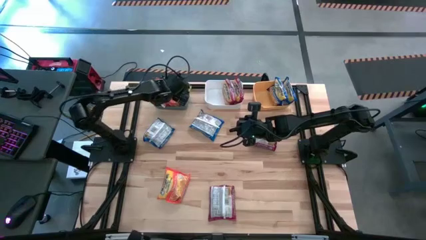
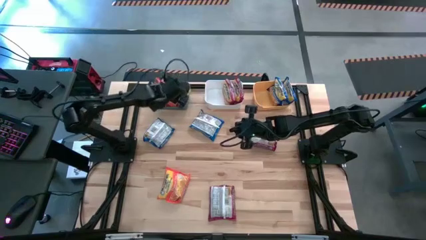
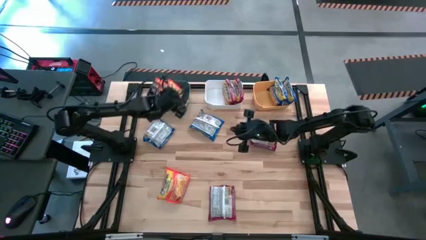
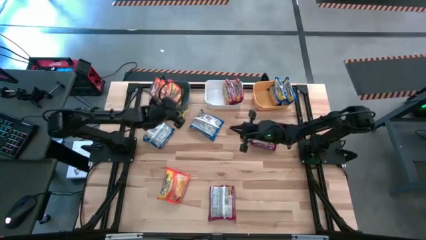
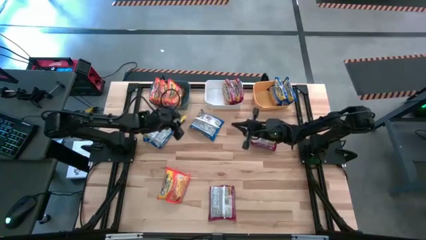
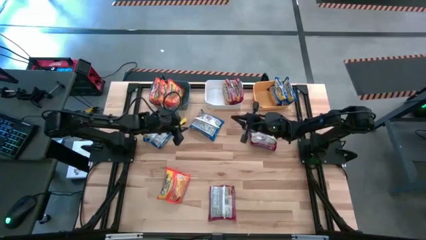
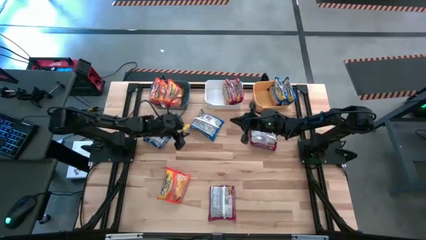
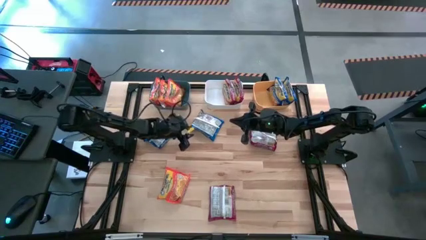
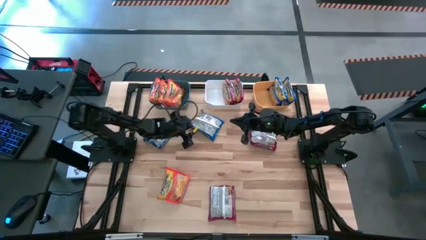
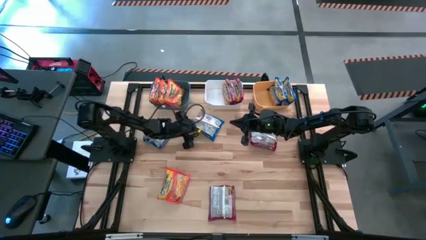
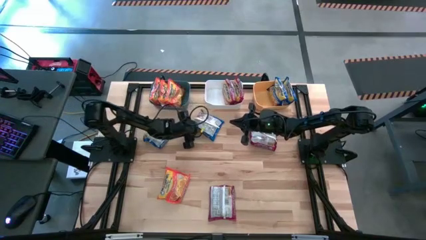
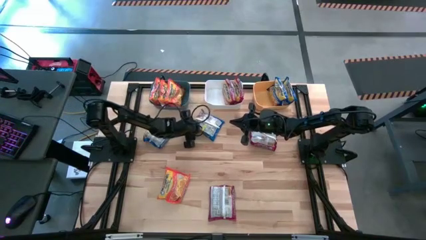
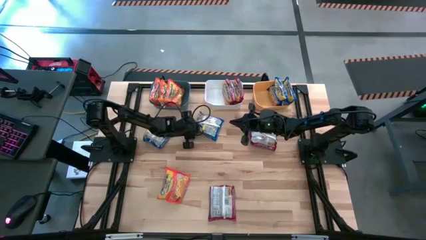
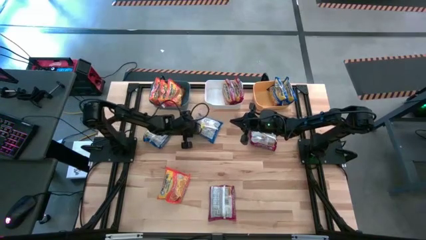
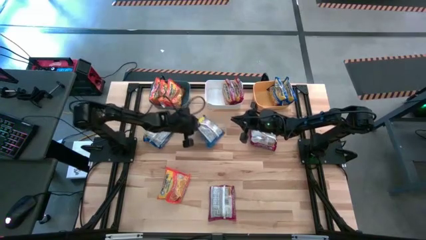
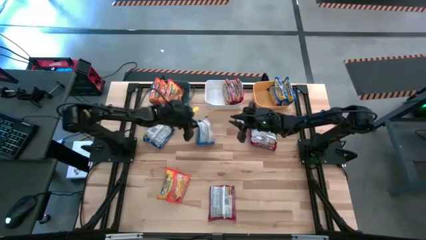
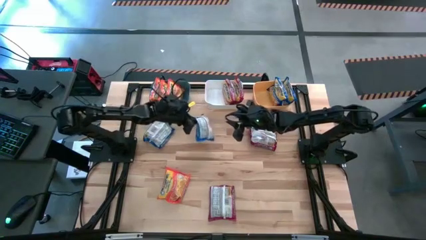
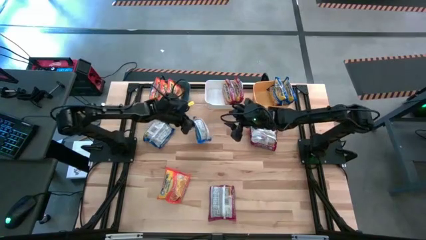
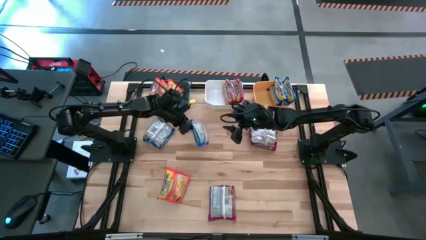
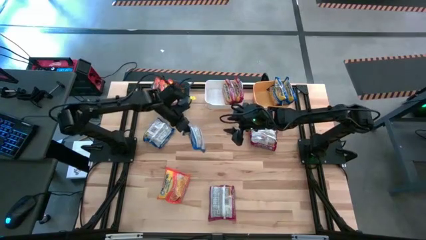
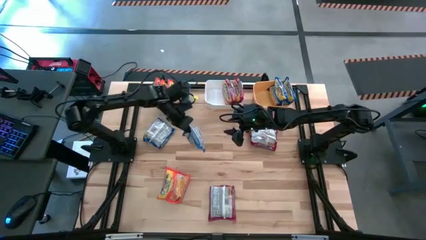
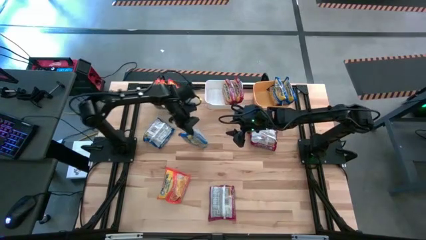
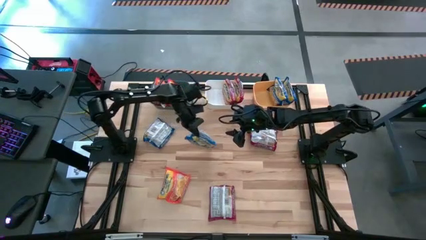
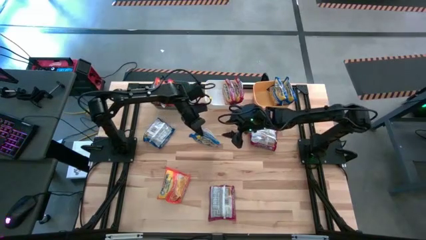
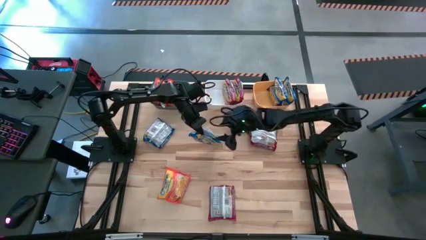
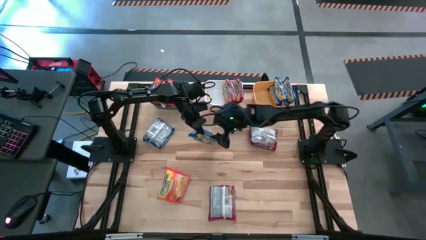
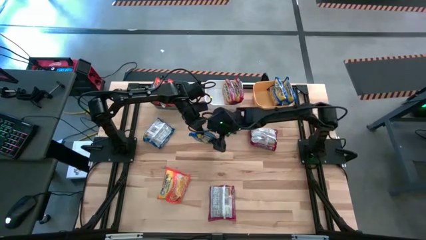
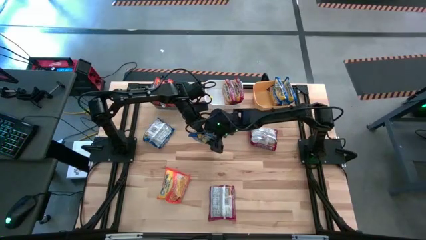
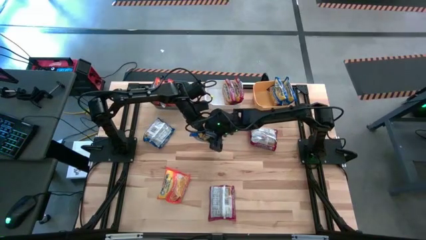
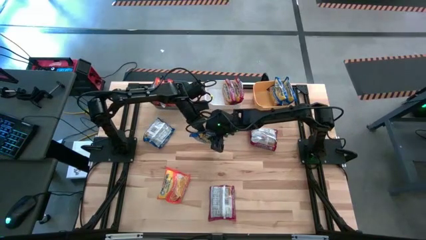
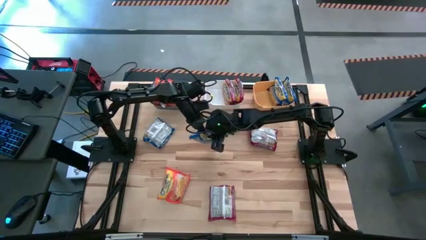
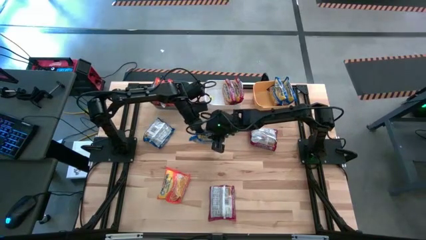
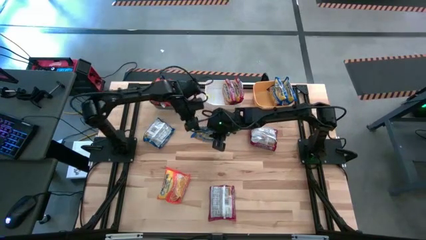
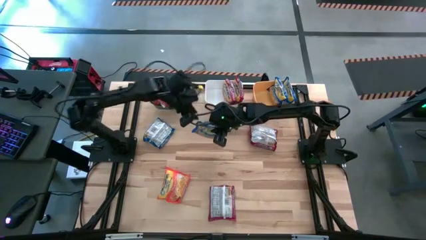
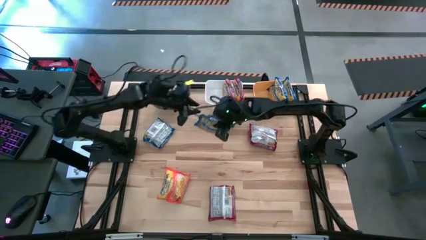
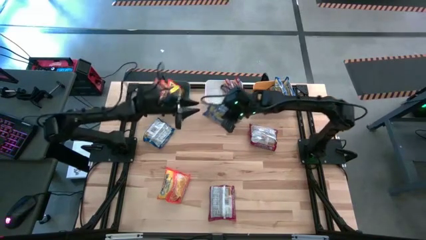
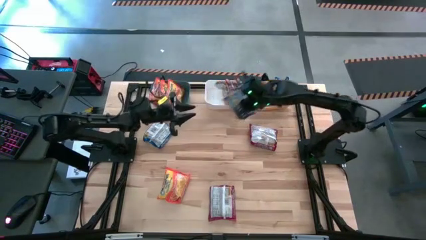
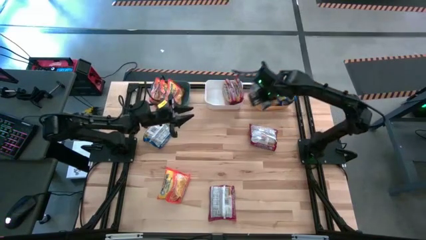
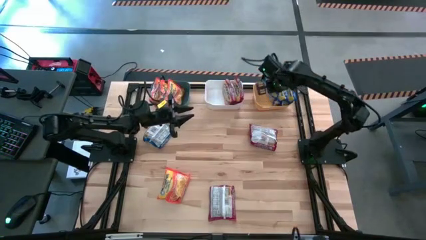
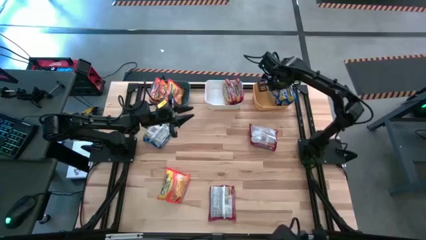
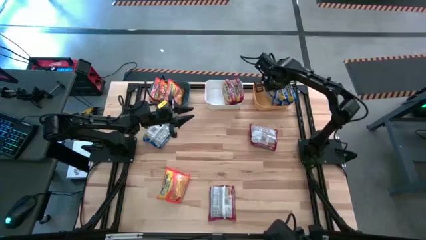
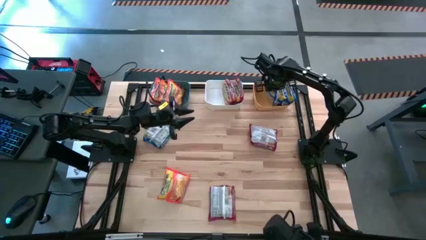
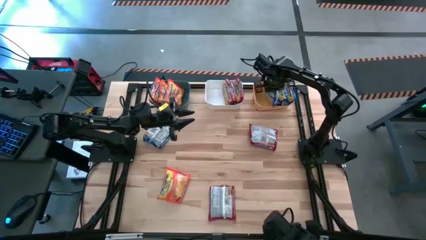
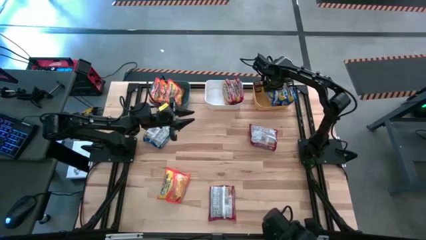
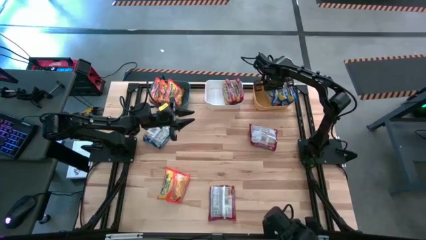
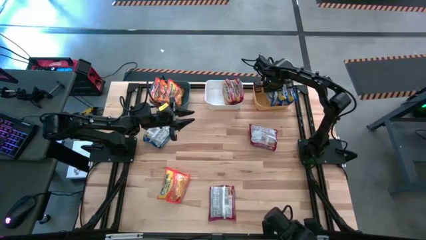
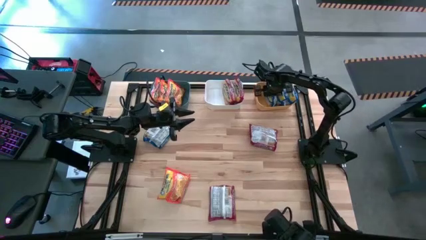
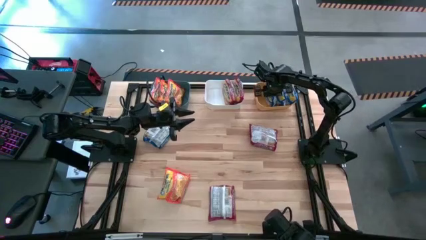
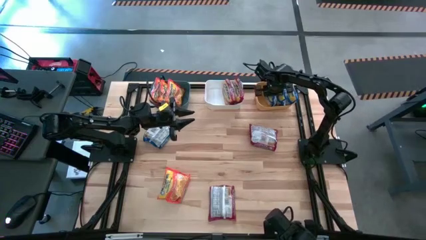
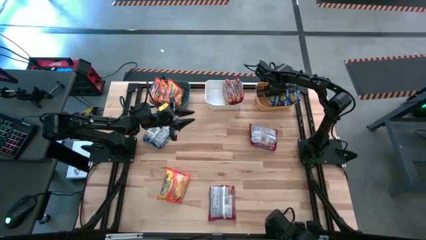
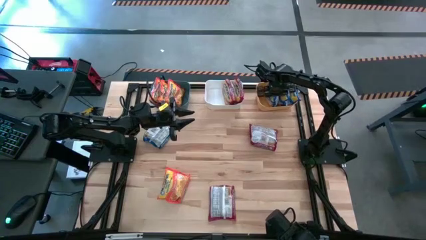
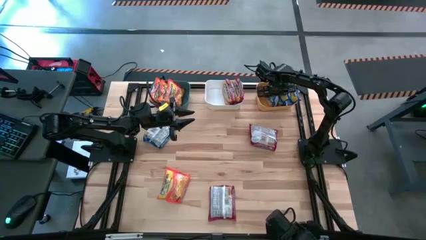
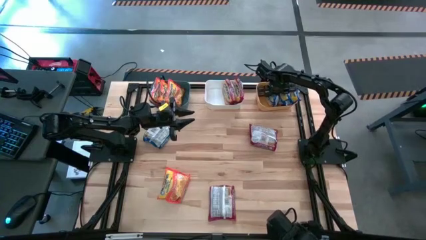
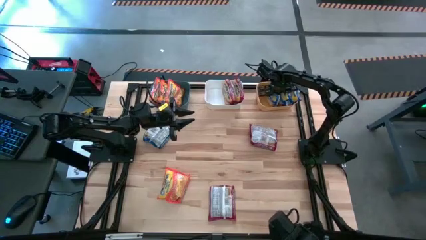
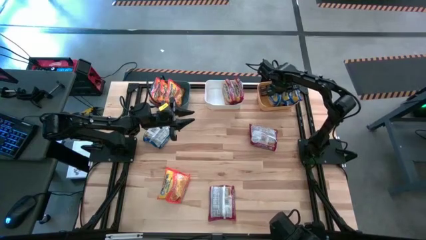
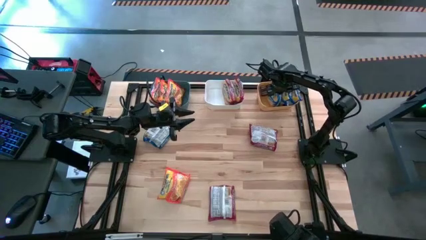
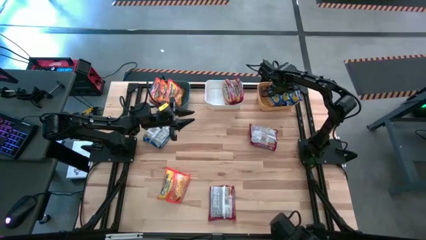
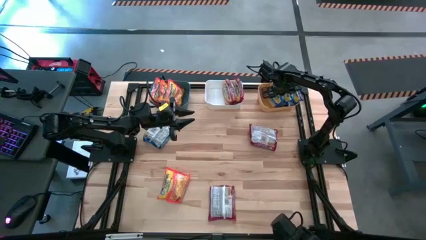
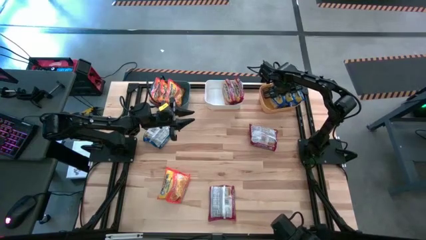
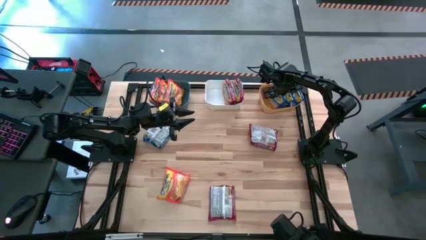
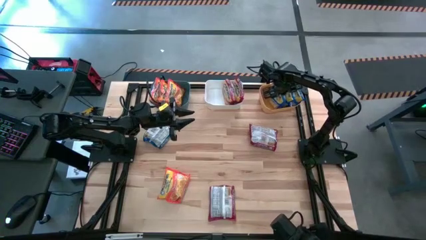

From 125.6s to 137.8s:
Task: Sort Maruchan noodles
Put the top right blue noodle pack into the yellow bin

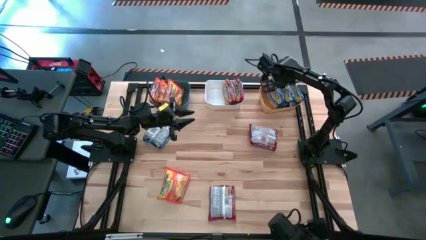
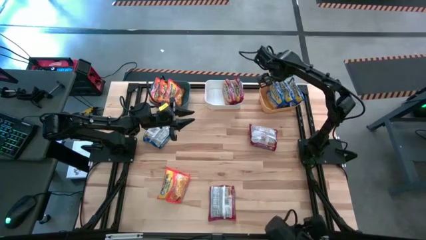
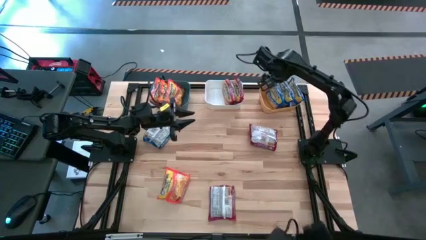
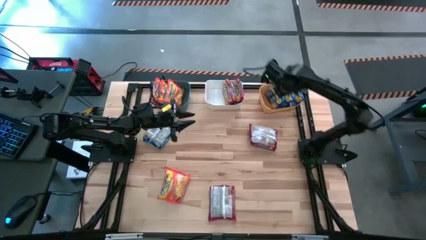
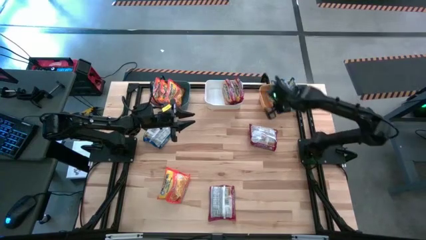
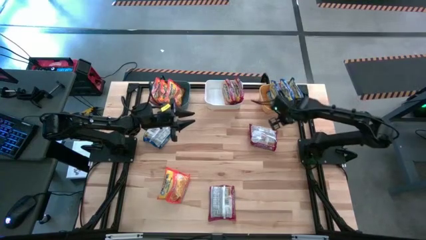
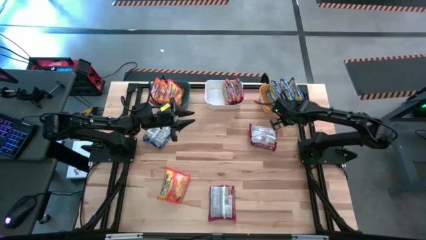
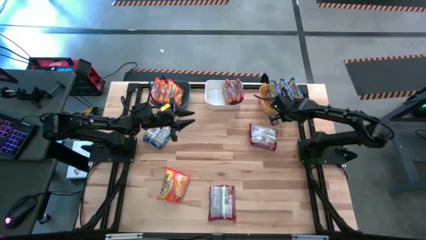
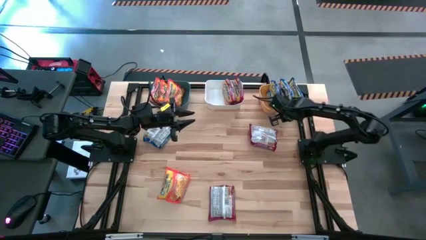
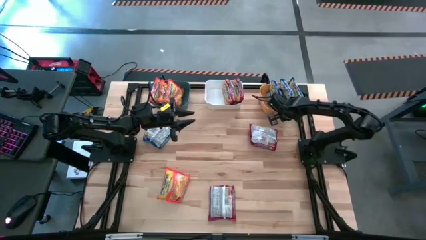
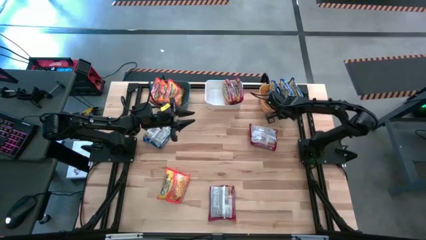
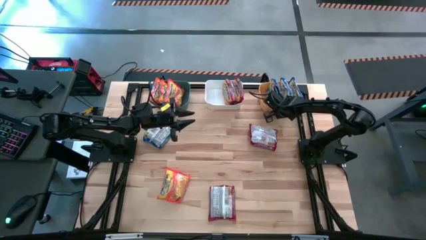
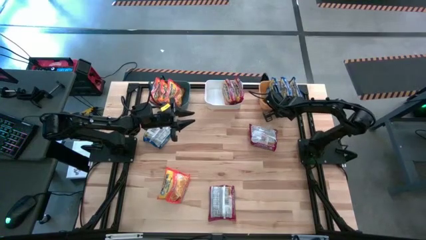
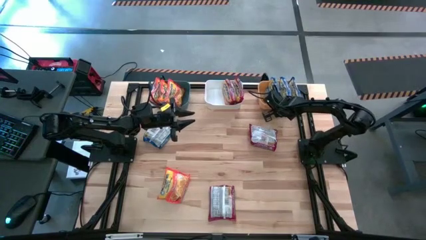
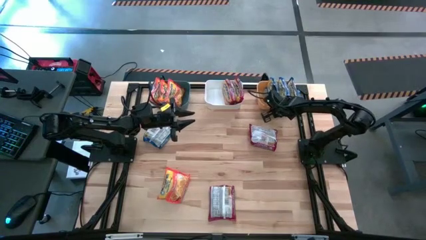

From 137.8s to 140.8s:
Adjust the yellow bin
